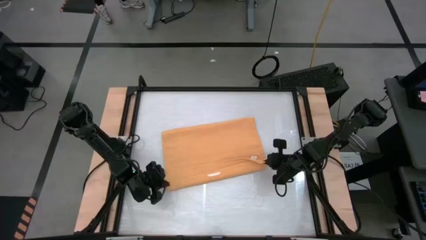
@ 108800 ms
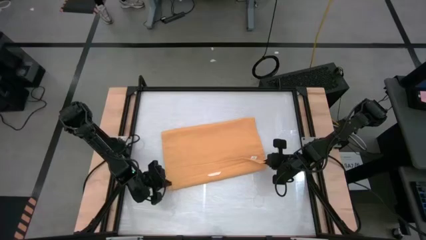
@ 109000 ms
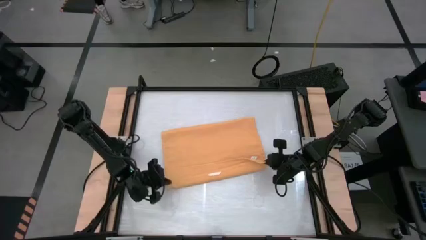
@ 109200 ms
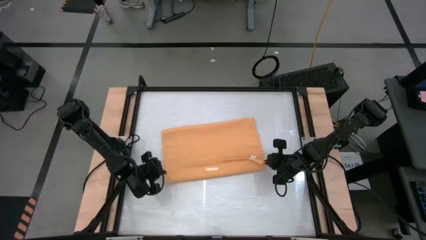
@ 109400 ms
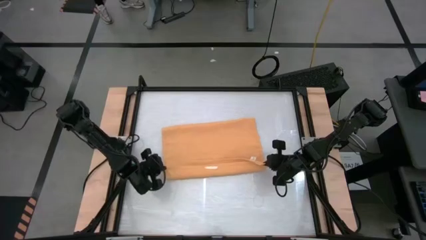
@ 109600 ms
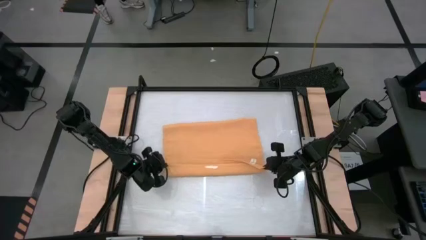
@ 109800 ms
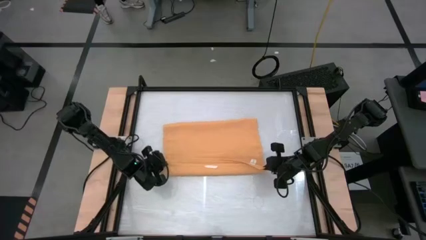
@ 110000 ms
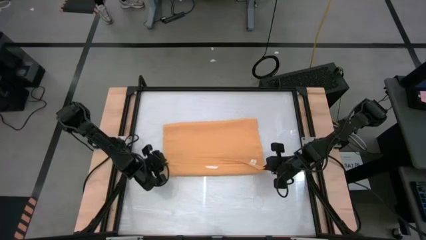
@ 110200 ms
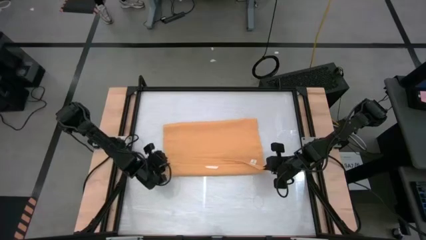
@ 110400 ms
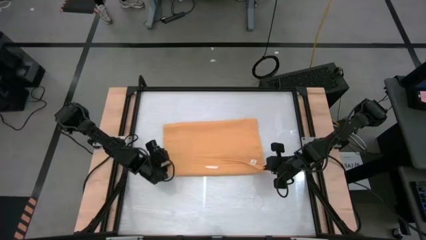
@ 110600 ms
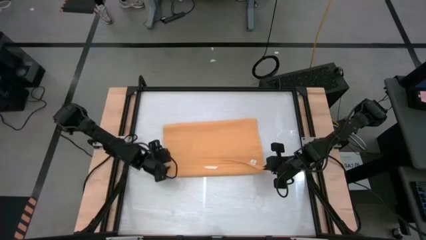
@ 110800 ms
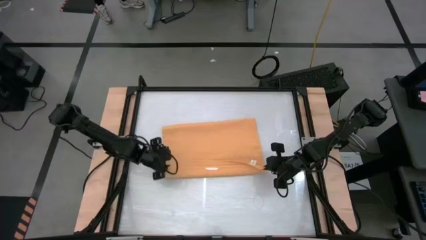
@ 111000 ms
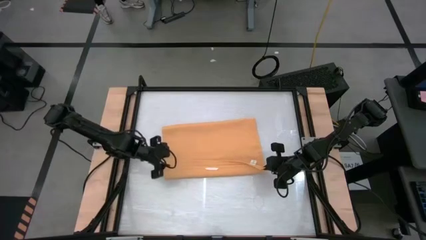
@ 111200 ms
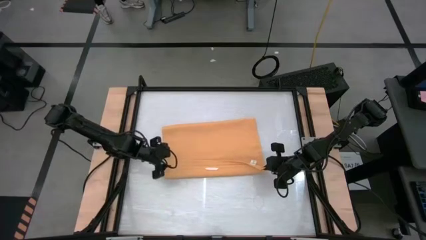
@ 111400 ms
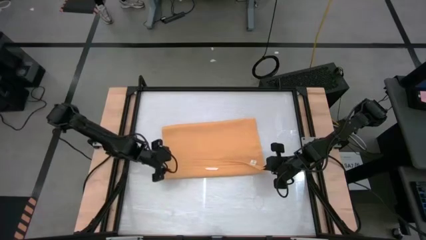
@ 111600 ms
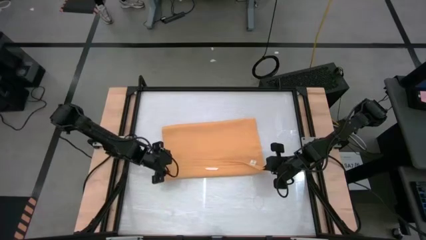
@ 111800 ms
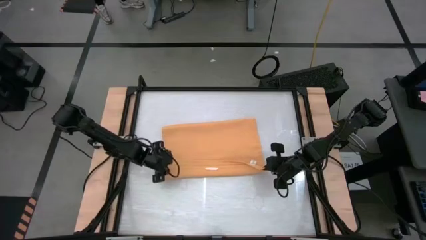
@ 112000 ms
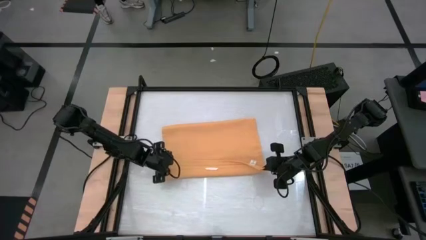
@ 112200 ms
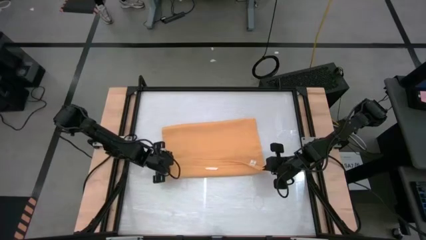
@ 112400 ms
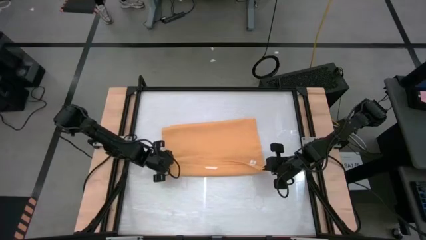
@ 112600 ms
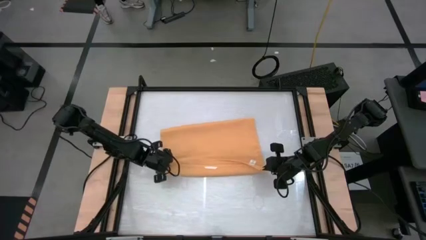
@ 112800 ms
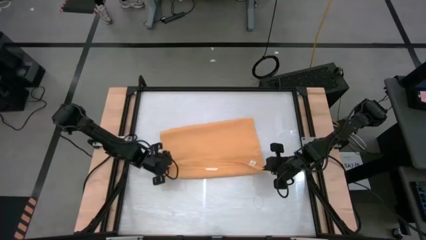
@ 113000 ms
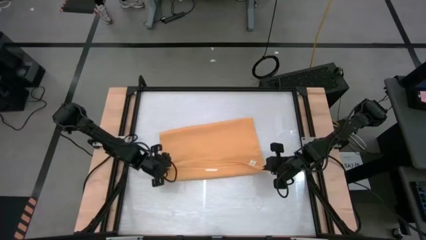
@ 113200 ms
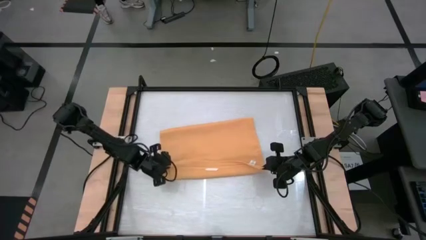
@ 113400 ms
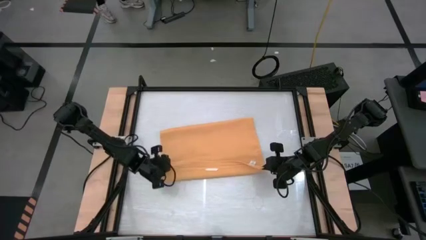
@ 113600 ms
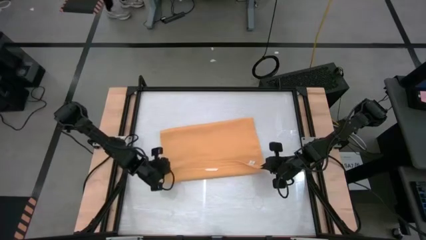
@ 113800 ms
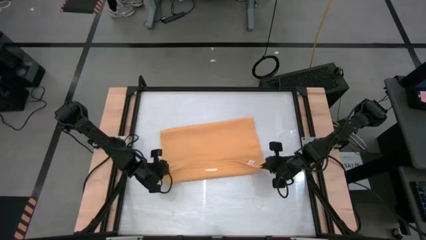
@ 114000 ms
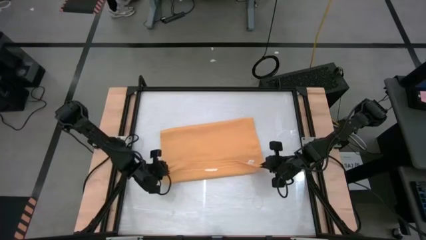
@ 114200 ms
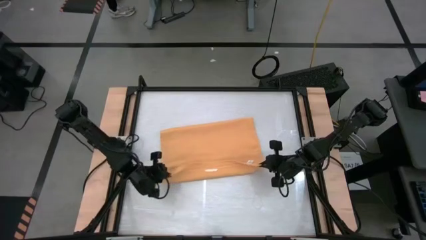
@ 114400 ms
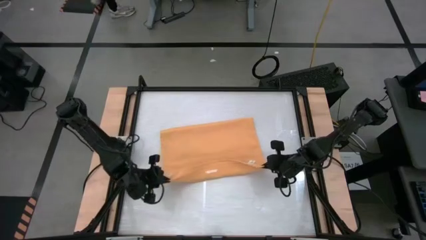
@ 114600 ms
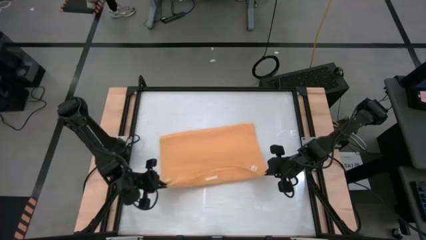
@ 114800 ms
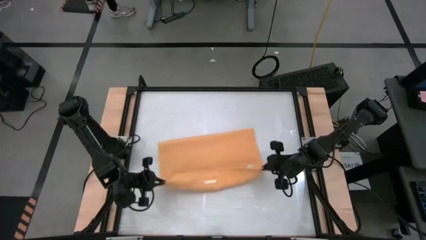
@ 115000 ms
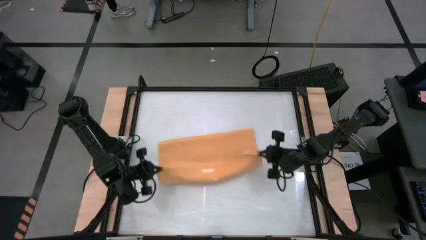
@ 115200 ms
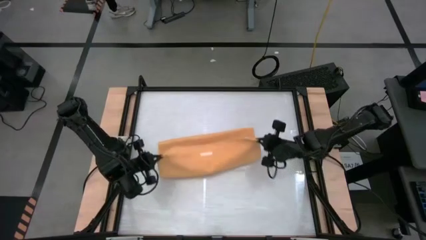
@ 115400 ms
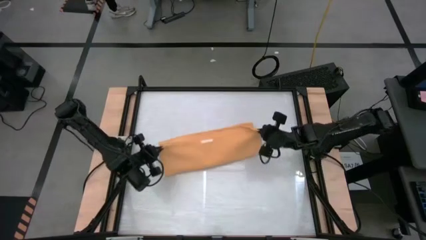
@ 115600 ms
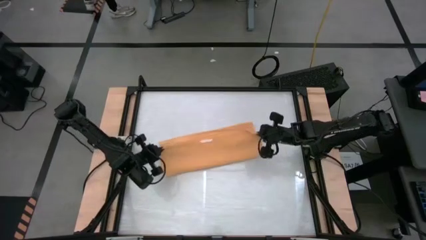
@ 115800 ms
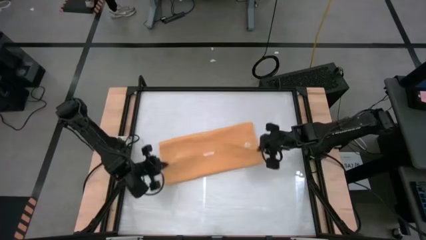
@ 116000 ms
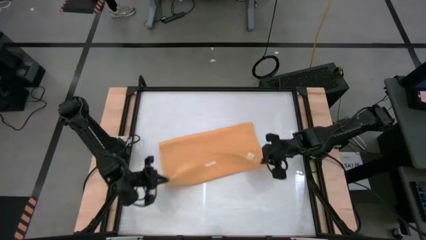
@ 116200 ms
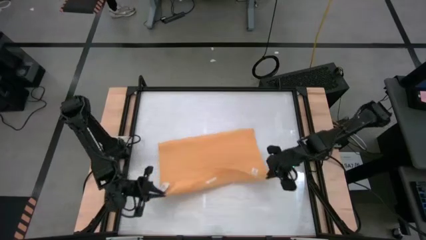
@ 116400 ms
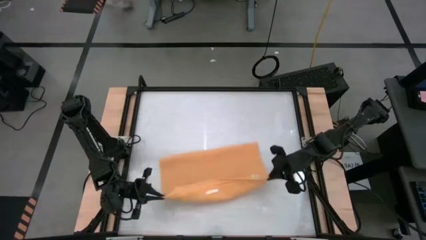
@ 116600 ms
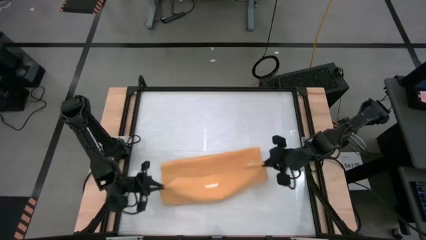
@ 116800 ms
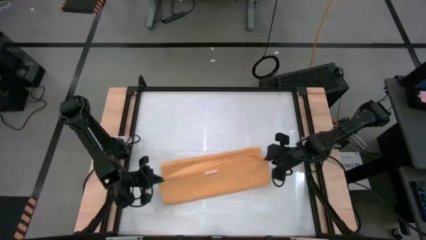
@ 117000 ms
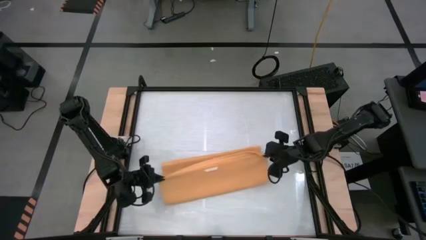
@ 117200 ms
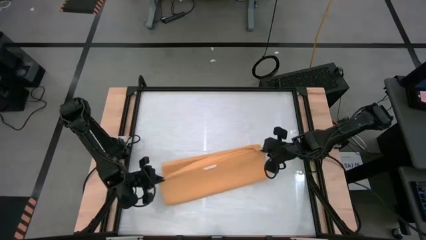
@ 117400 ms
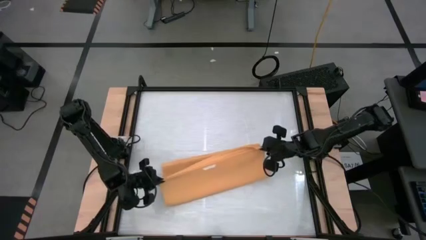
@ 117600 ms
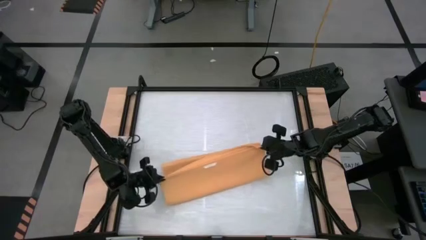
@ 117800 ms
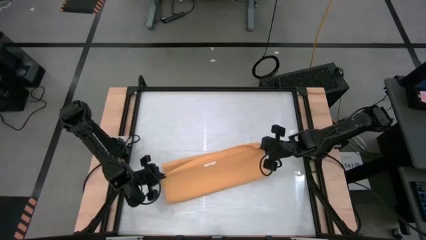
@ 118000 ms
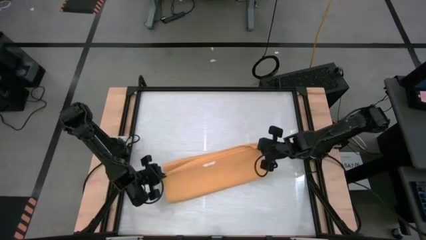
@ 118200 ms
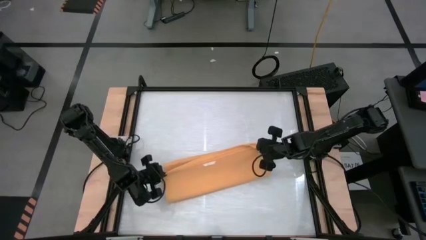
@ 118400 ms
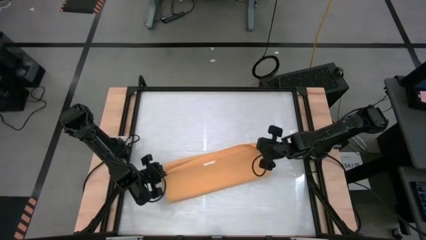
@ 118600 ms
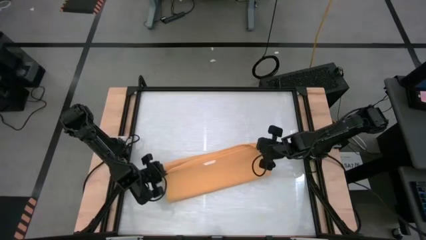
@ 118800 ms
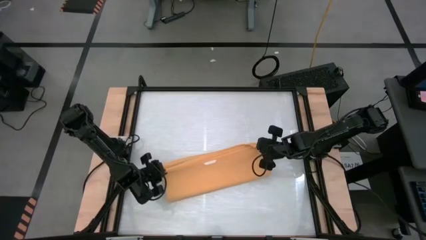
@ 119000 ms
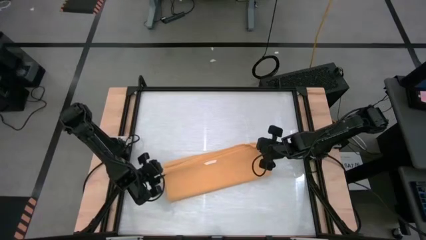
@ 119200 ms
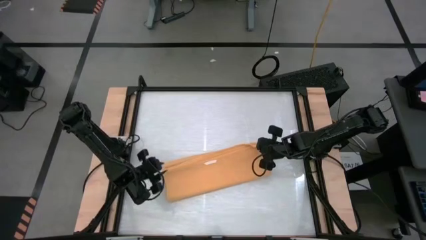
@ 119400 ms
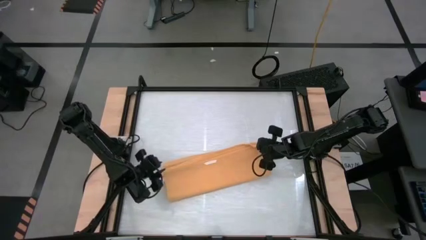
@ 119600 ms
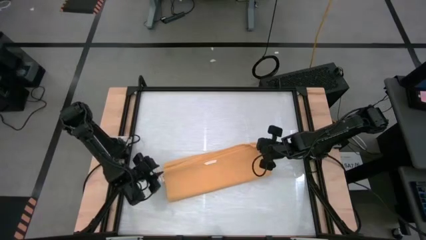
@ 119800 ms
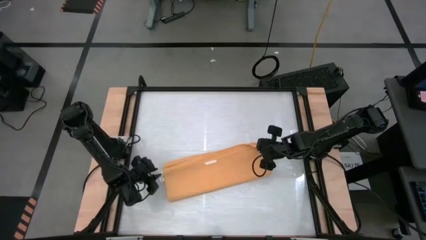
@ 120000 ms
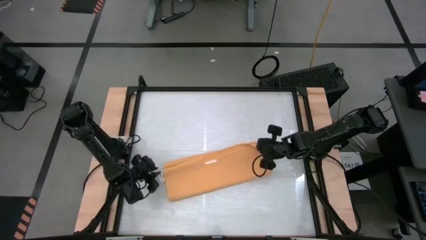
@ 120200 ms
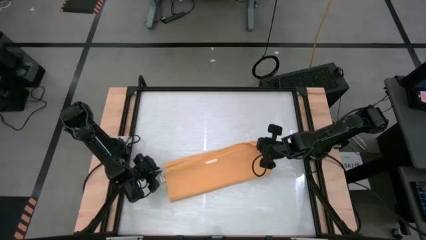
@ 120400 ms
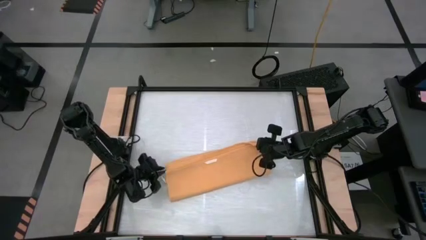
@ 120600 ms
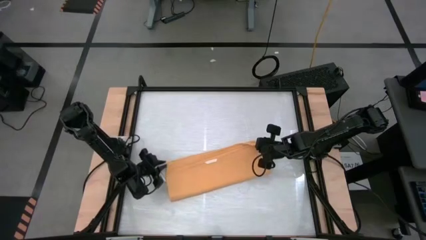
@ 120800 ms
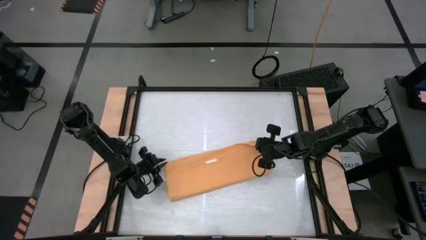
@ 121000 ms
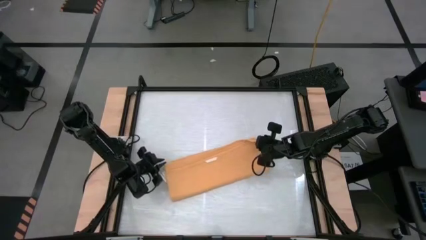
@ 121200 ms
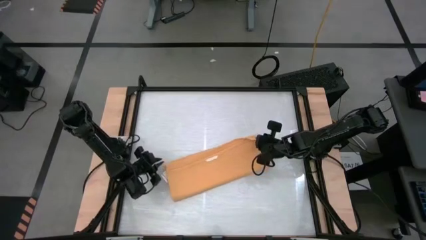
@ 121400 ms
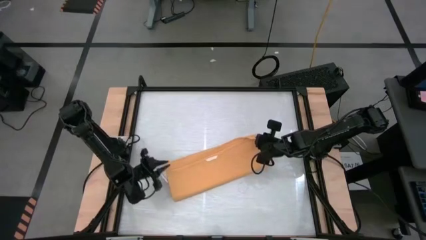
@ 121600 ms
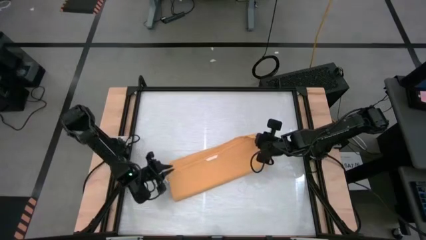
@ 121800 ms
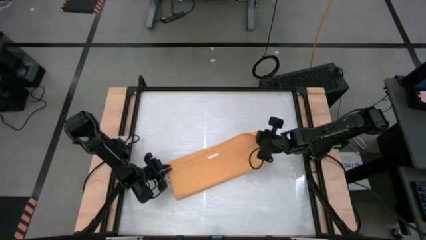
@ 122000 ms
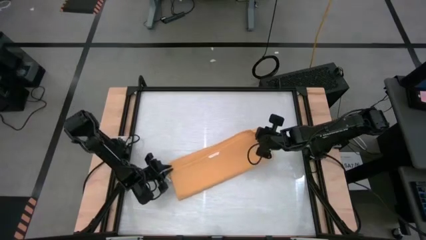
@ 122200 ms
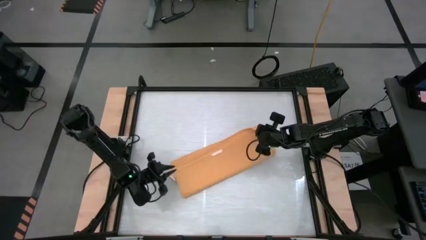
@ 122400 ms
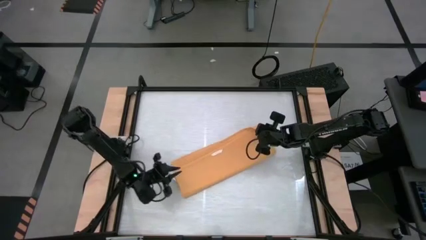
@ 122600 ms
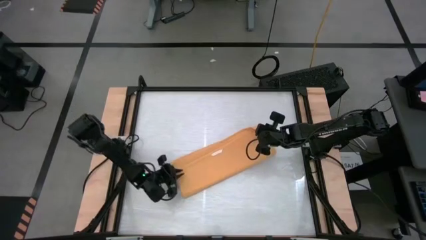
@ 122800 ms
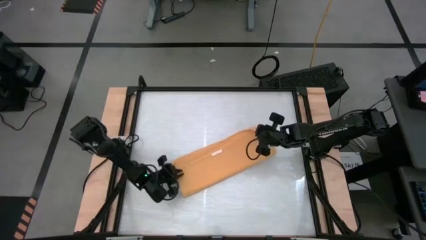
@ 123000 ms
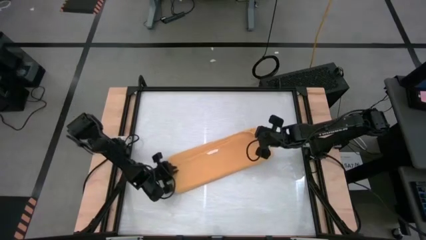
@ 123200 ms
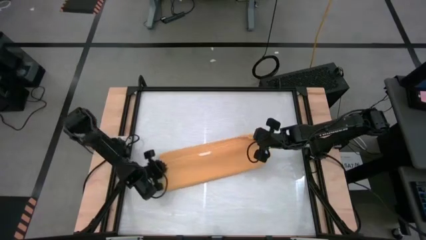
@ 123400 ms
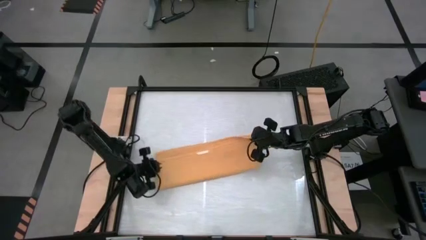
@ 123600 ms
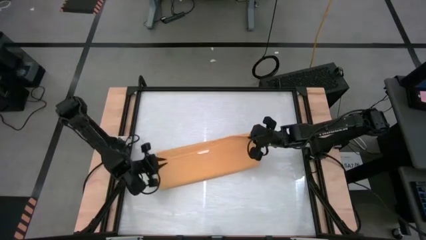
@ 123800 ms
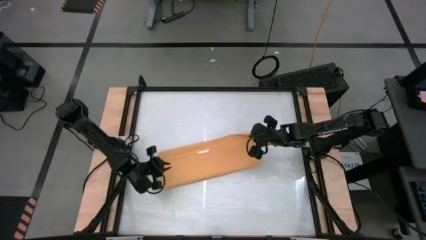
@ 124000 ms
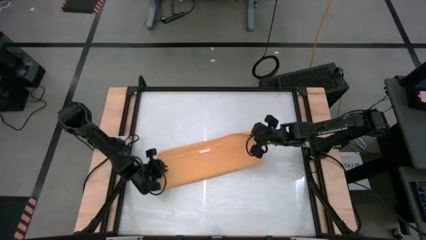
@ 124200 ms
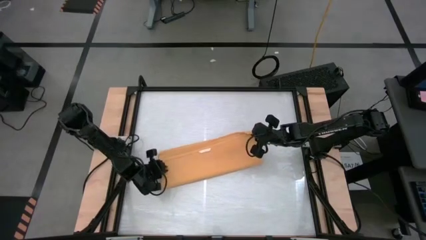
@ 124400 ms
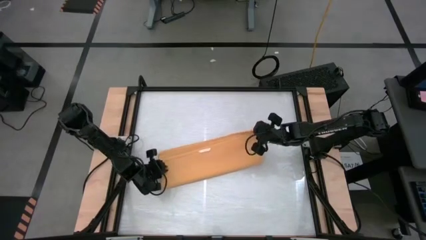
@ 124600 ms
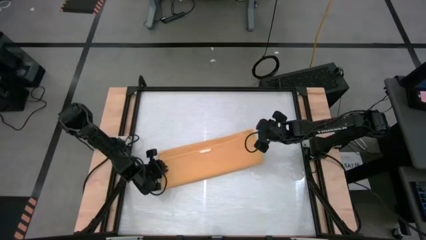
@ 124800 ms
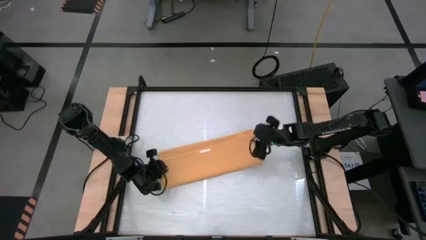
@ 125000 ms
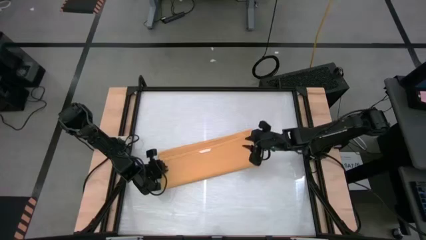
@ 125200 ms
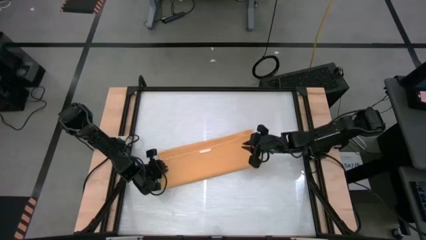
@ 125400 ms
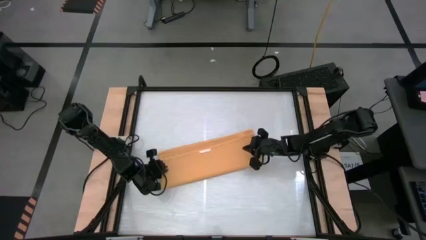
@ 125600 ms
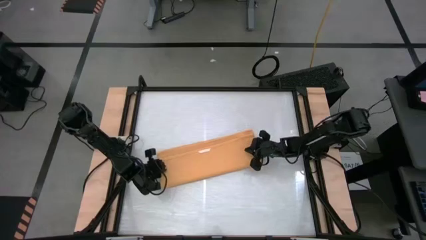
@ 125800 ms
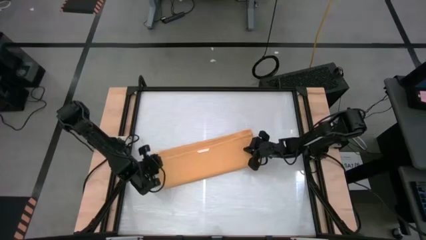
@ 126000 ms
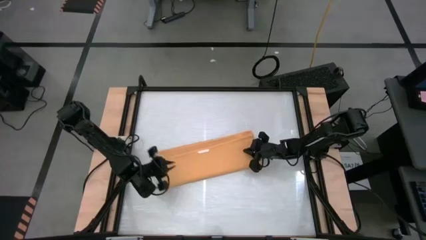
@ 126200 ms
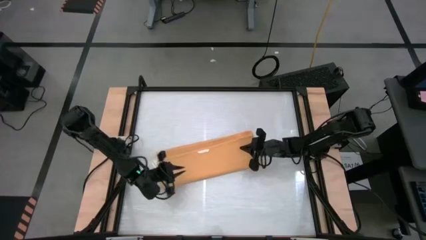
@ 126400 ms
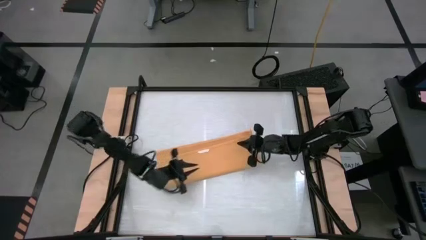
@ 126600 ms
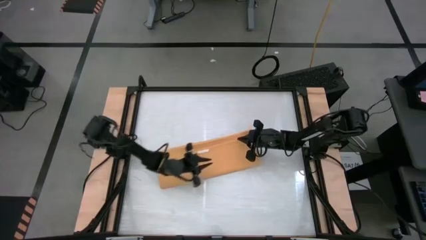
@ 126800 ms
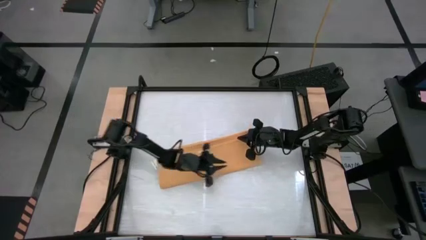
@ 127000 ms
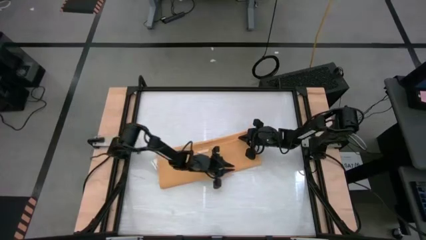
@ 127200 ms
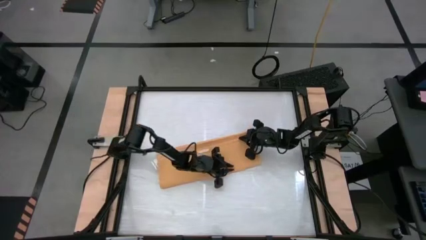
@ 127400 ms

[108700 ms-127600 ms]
Task: Roll towel
Roll the yellow towel
